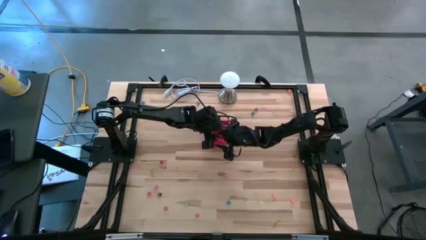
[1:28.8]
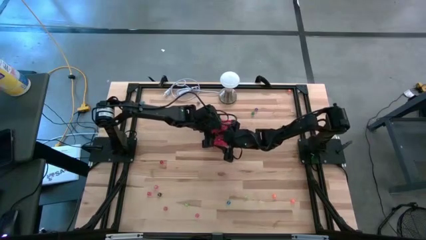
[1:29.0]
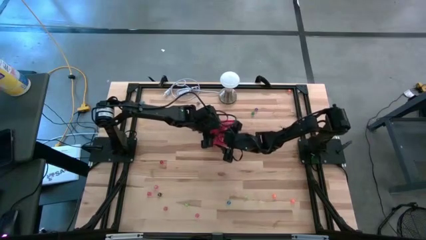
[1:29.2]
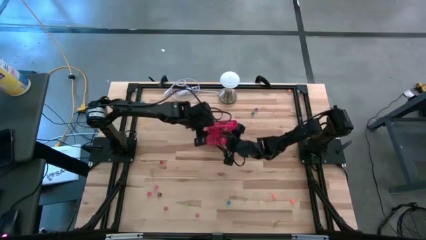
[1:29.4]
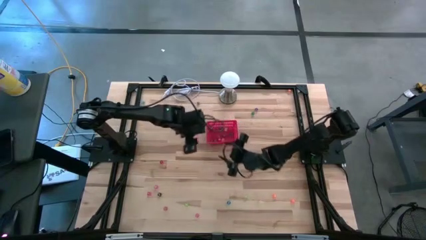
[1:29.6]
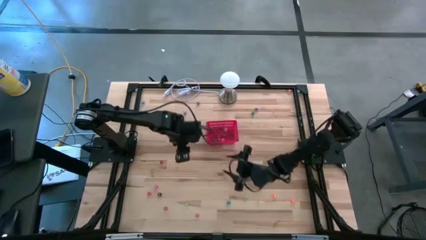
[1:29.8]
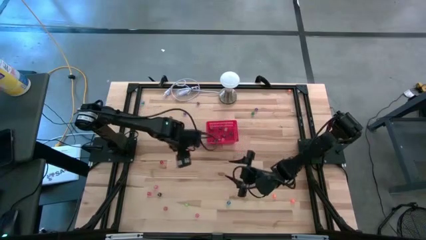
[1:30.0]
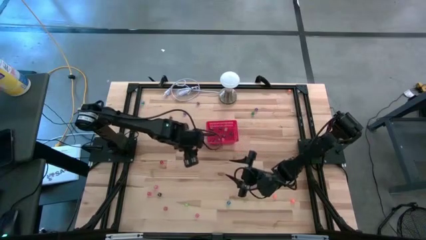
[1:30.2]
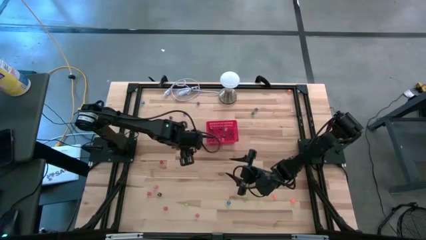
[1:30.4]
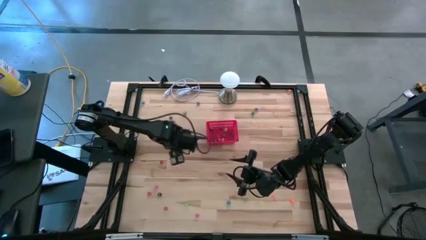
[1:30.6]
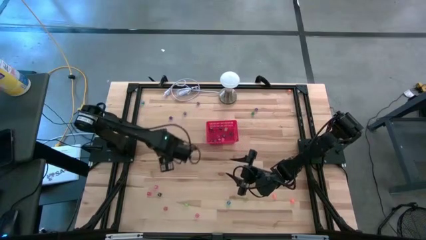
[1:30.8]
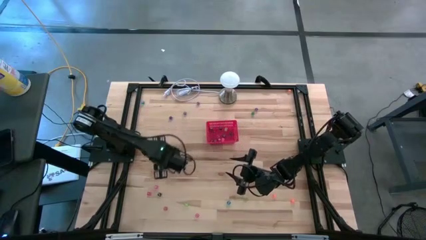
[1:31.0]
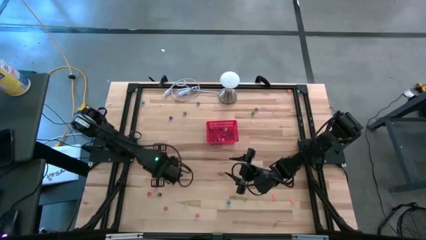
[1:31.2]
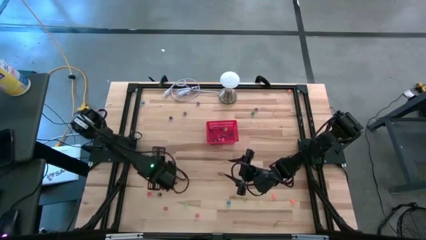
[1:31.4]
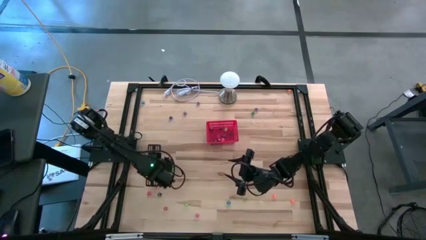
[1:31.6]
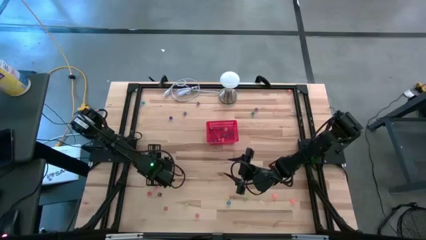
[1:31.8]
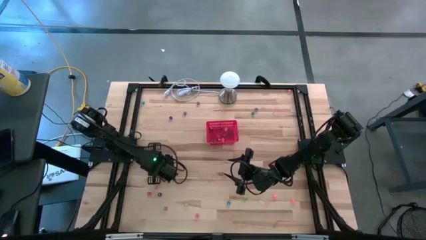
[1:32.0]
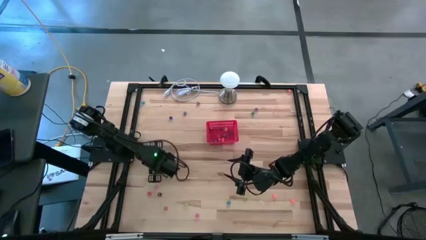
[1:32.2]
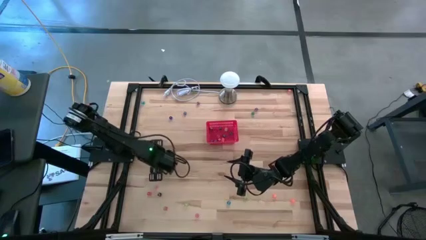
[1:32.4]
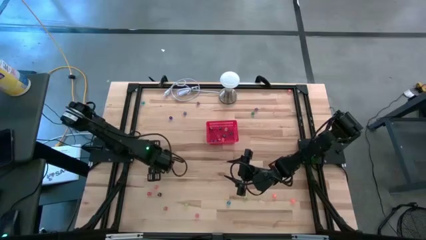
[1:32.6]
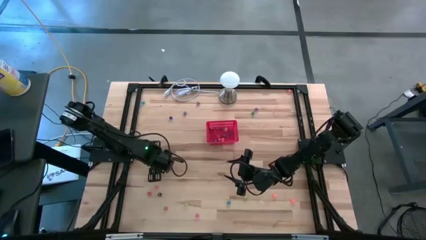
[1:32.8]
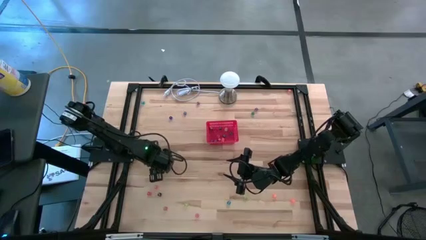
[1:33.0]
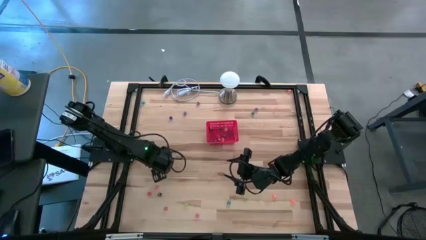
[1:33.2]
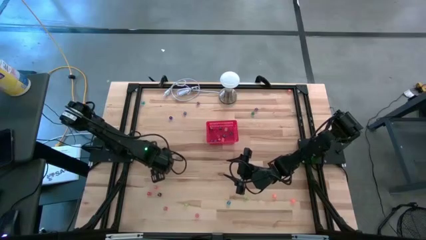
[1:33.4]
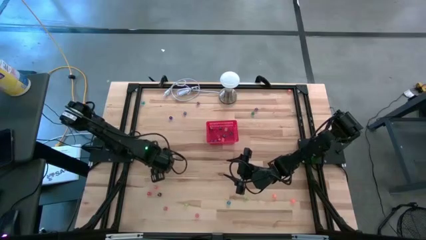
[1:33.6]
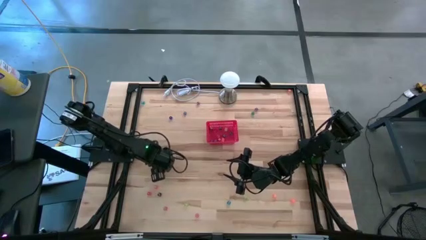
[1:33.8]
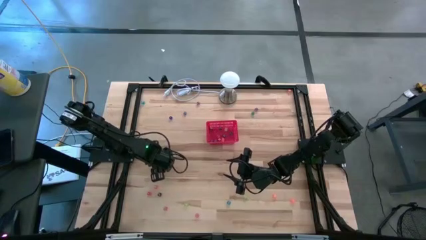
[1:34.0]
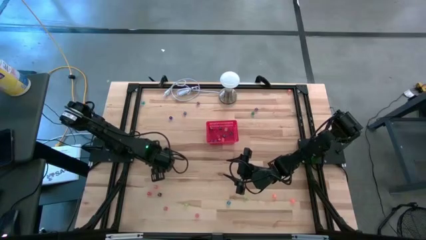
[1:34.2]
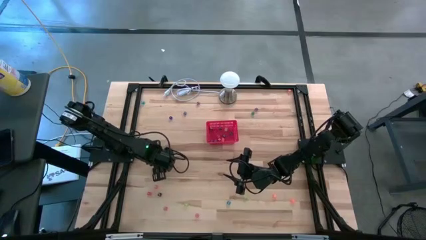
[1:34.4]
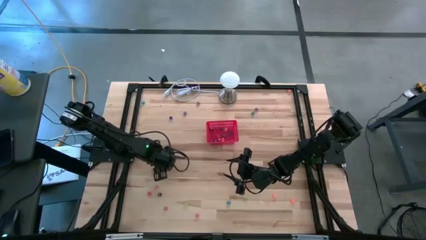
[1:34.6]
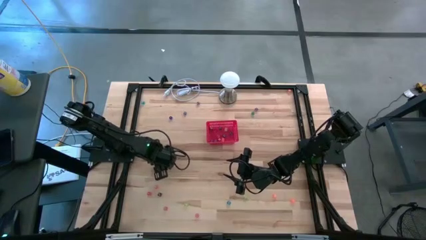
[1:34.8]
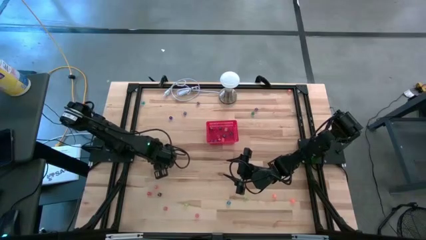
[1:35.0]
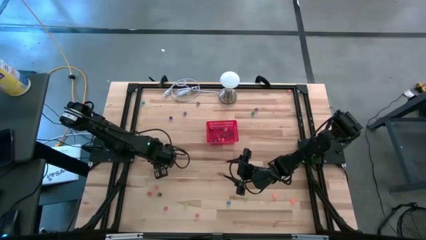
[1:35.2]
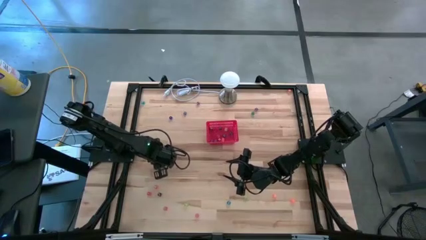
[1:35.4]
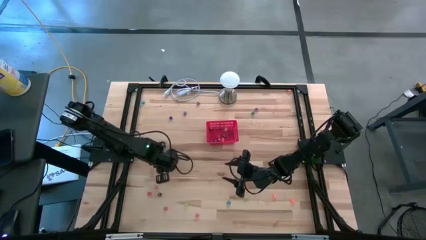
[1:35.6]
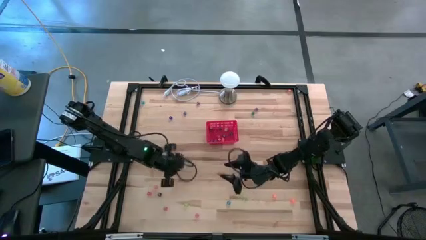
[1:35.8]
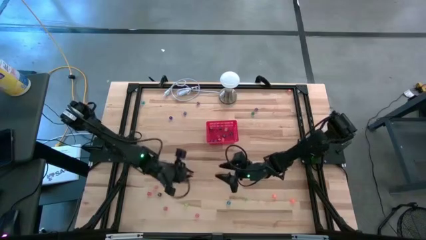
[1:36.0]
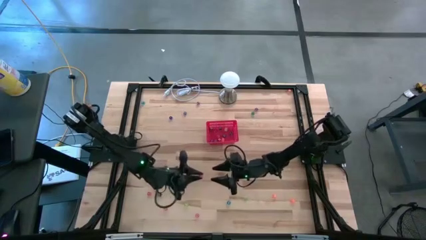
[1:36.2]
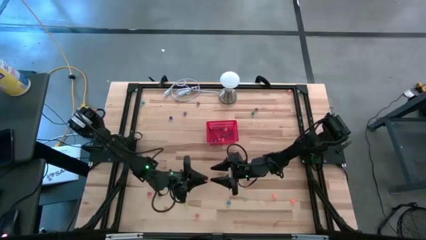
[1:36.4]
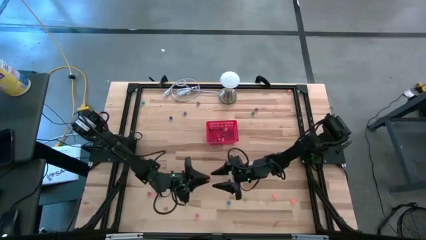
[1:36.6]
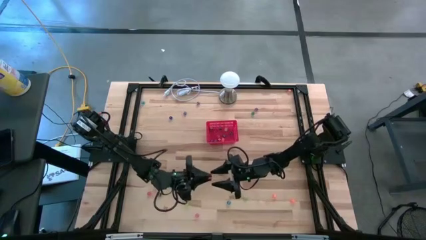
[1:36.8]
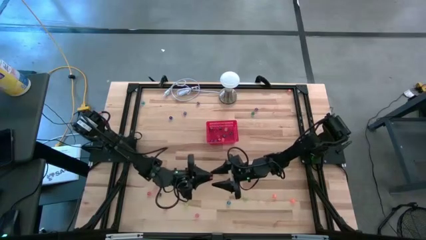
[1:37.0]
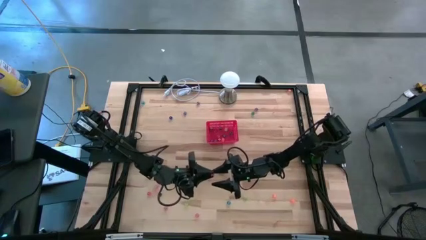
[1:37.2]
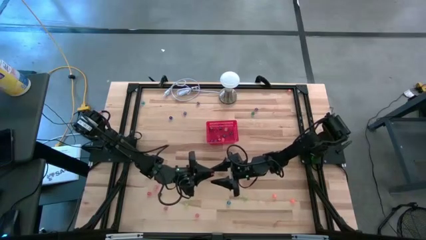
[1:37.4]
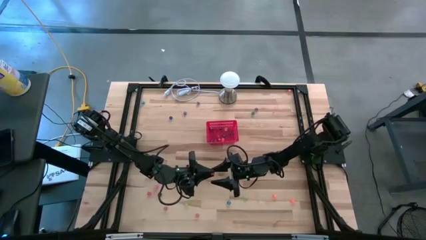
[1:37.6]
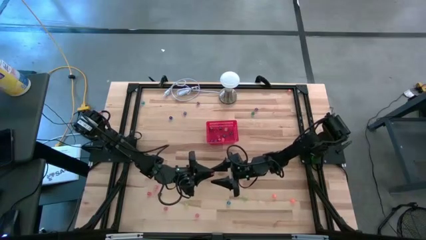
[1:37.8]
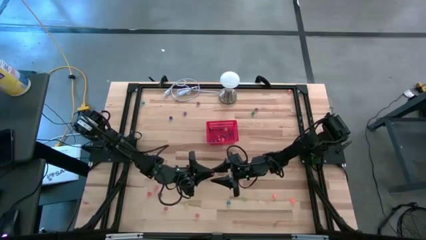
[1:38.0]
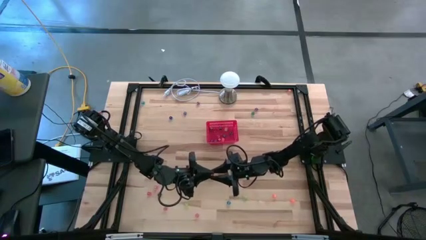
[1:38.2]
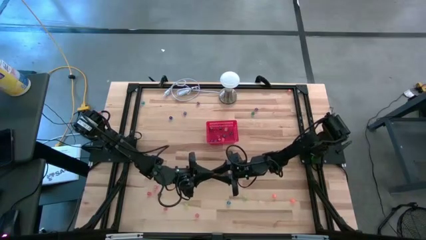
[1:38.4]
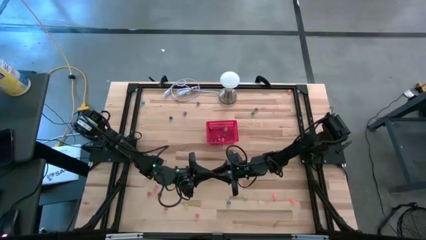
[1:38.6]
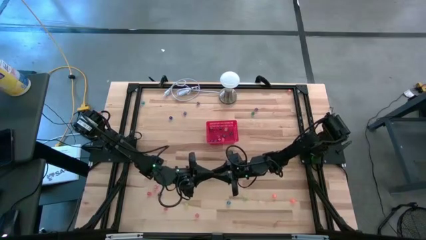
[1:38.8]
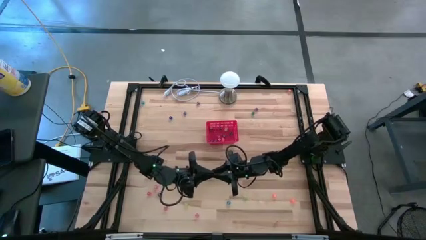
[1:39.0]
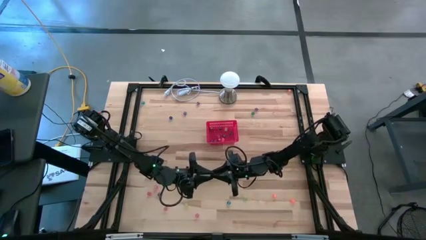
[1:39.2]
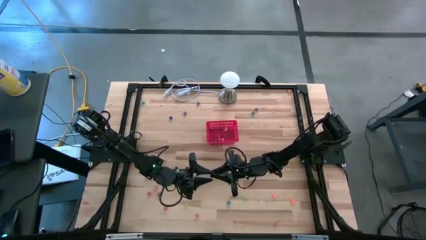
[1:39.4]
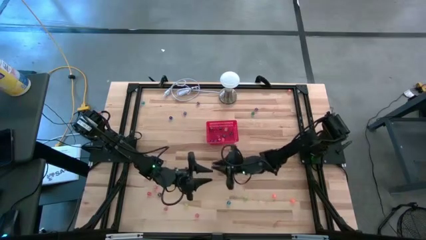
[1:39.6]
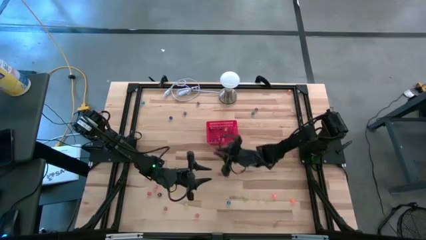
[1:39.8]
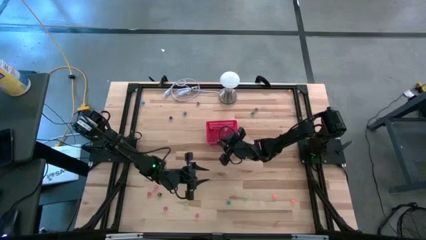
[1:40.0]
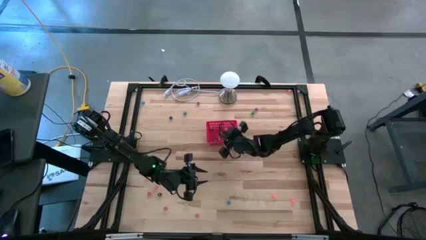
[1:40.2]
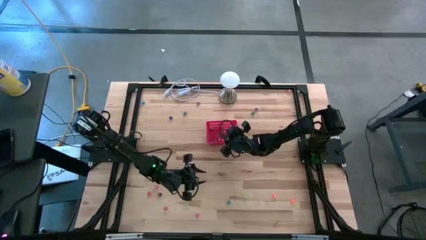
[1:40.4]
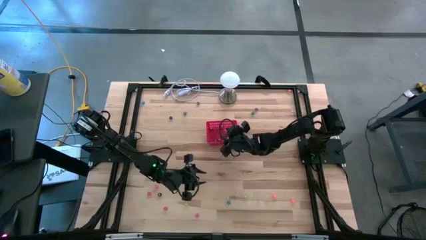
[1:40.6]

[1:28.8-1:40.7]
Task: Pick & Place Dice
Put the top red dice into the bin

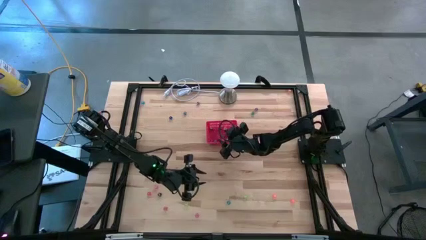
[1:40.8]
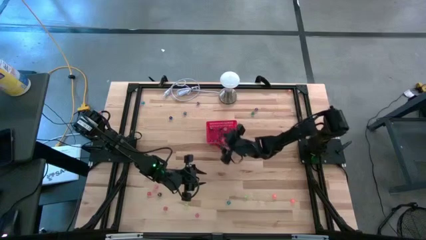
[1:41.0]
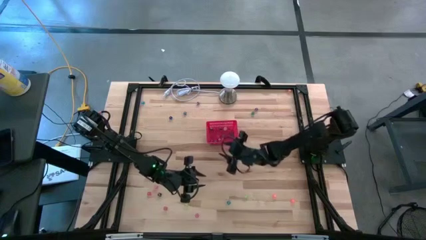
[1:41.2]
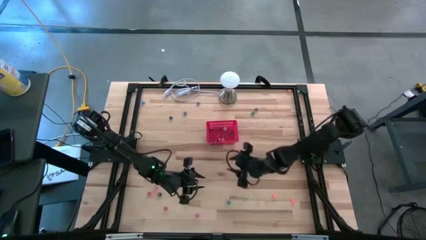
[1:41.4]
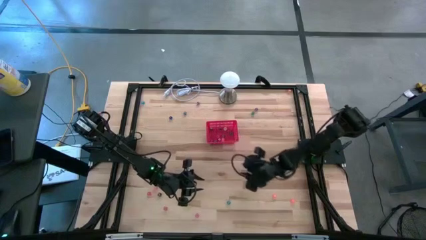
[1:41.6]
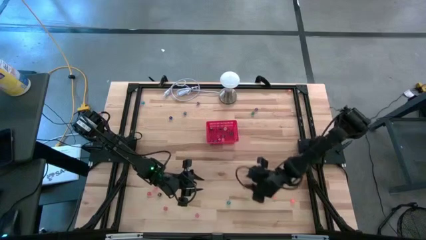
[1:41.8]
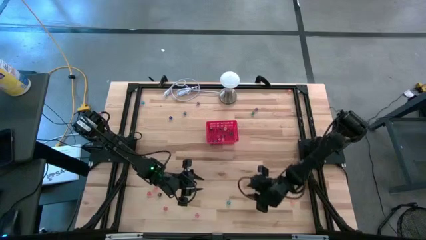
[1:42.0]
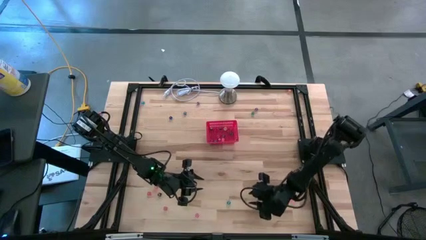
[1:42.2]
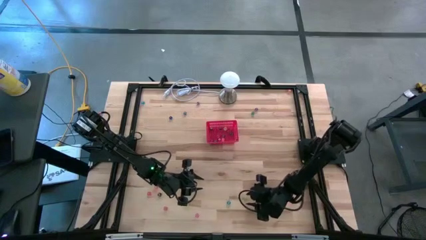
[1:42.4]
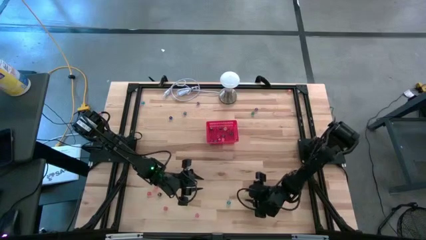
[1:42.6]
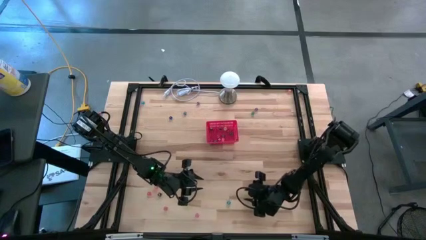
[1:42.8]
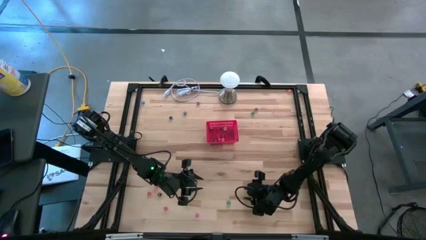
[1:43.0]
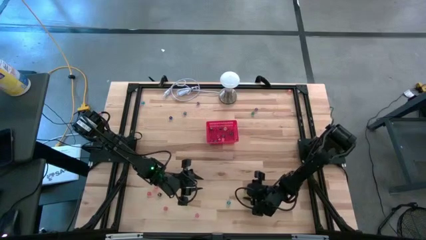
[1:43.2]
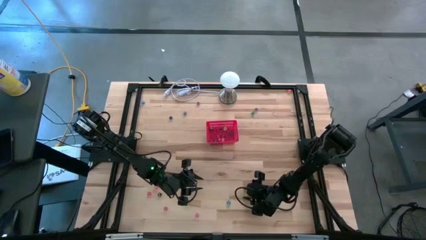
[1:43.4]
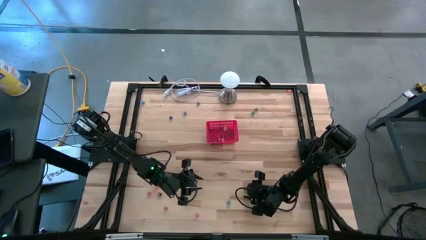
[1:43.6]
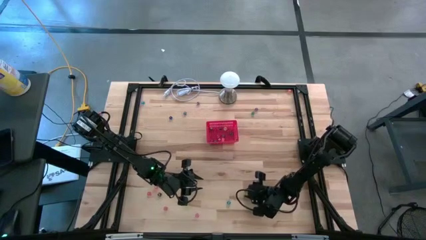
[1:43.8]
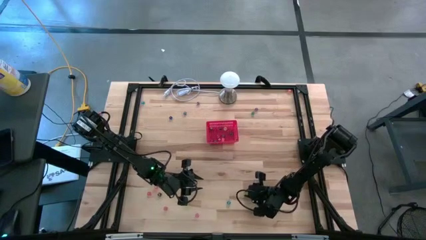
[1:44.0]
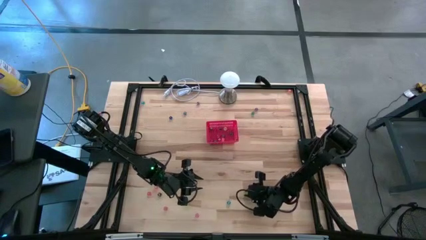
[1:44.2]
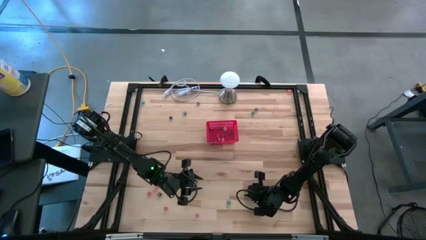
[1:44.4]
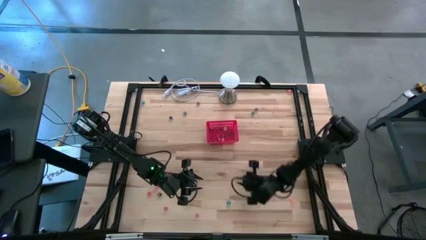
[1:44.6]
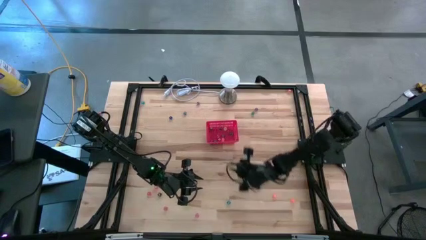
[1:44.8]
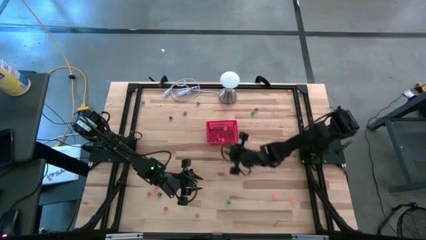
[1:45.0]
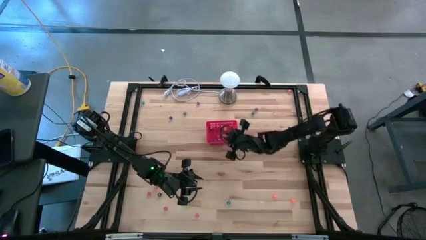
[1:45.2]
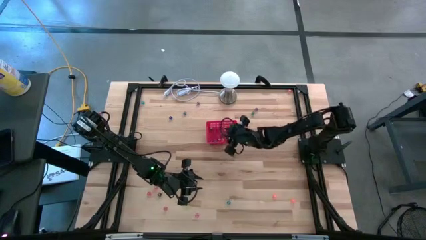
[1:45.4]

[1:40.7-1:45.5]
Put the right light green dice into the bin
